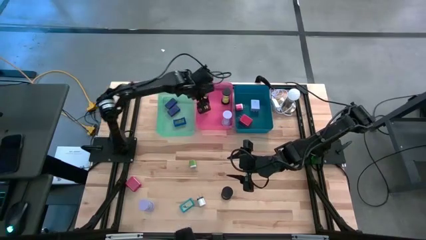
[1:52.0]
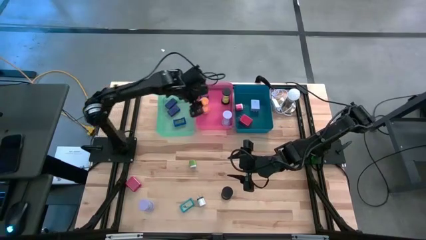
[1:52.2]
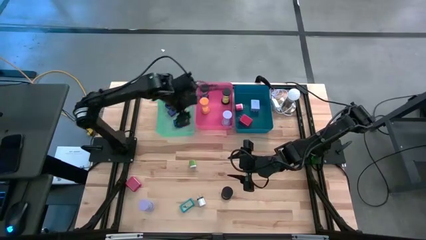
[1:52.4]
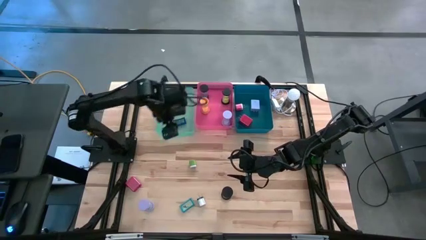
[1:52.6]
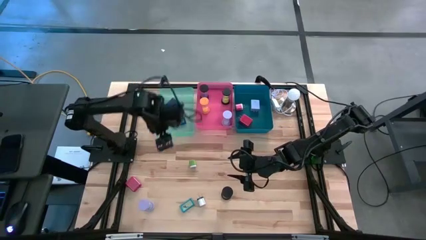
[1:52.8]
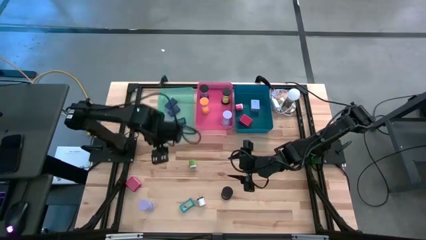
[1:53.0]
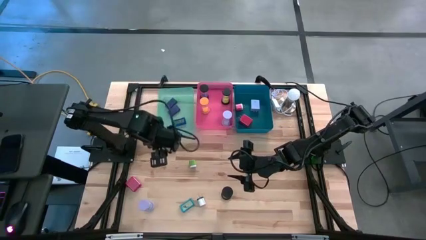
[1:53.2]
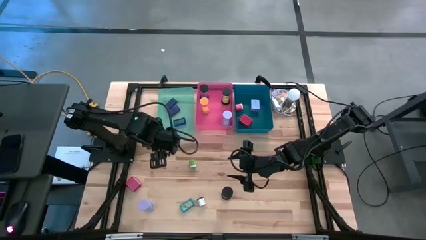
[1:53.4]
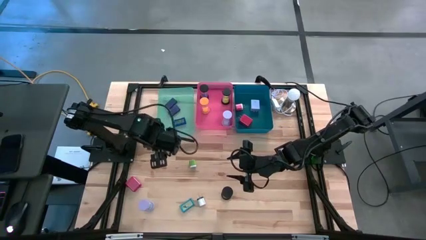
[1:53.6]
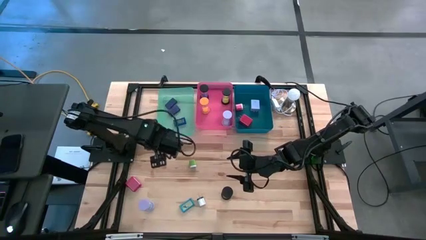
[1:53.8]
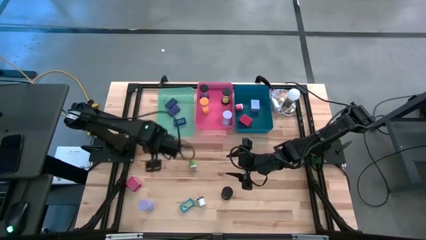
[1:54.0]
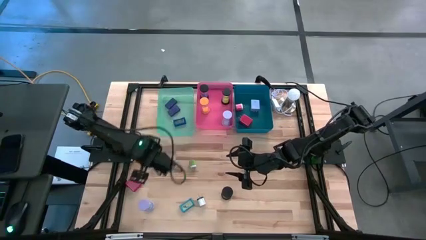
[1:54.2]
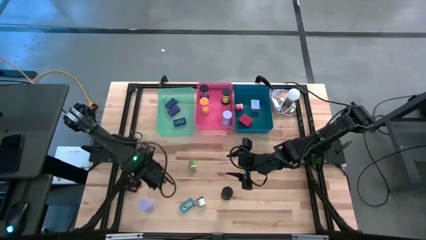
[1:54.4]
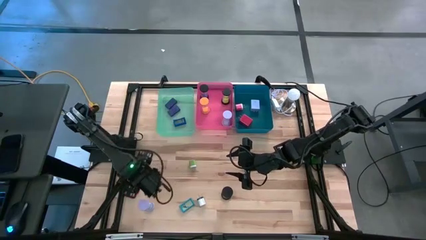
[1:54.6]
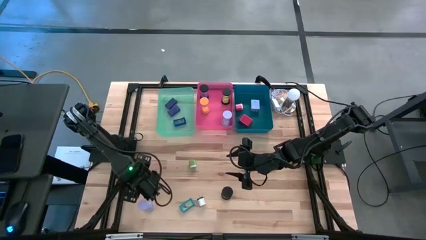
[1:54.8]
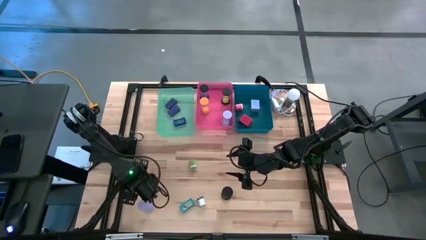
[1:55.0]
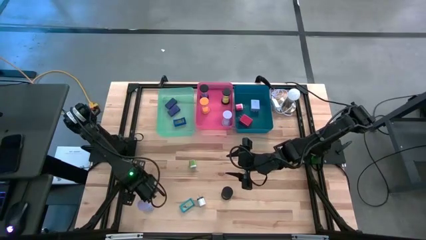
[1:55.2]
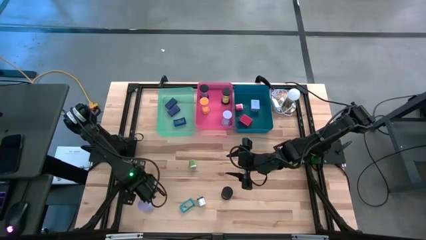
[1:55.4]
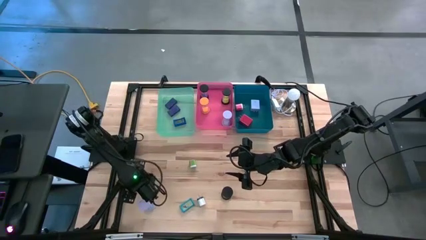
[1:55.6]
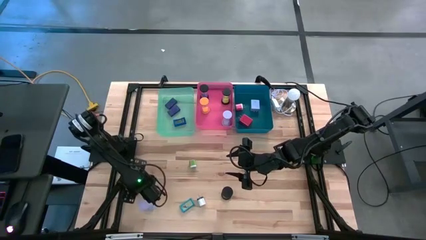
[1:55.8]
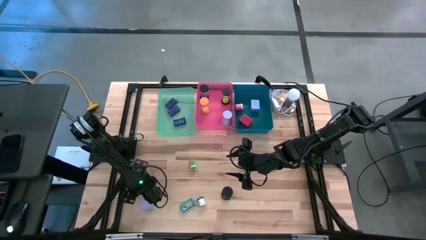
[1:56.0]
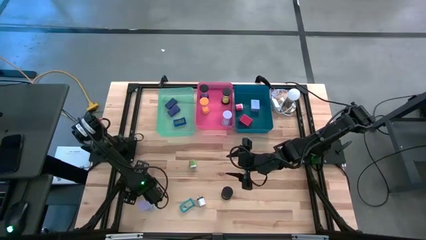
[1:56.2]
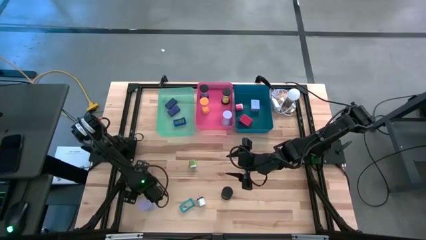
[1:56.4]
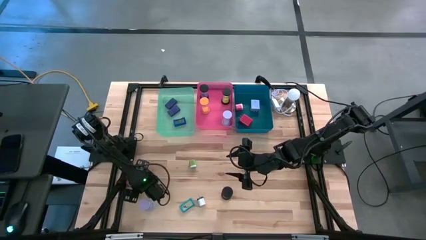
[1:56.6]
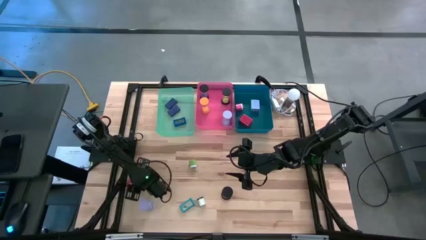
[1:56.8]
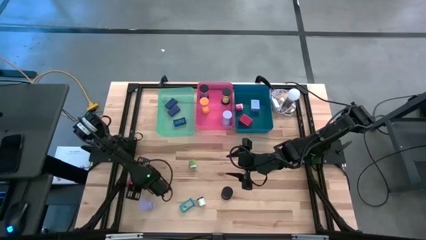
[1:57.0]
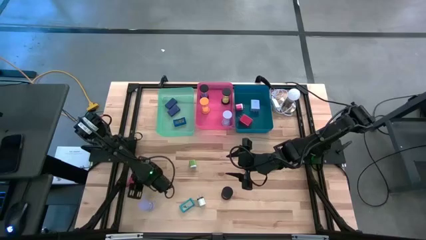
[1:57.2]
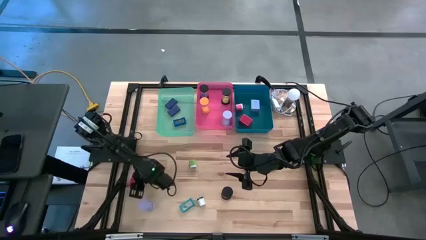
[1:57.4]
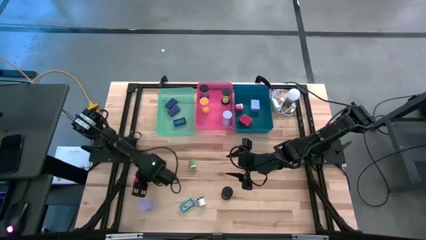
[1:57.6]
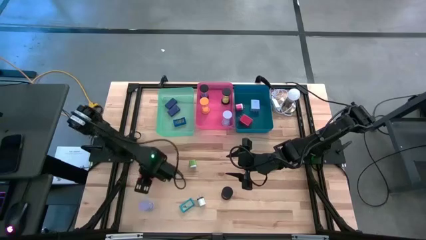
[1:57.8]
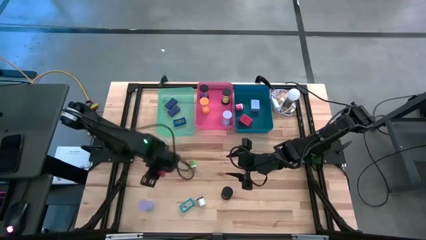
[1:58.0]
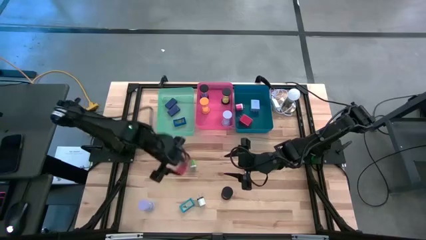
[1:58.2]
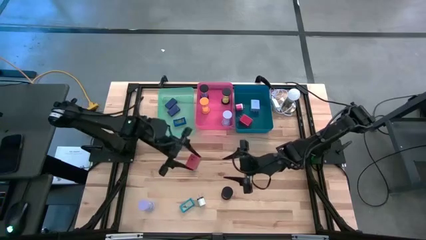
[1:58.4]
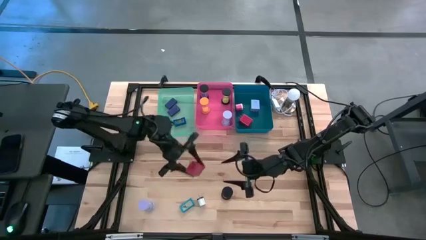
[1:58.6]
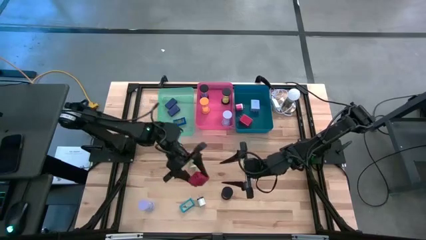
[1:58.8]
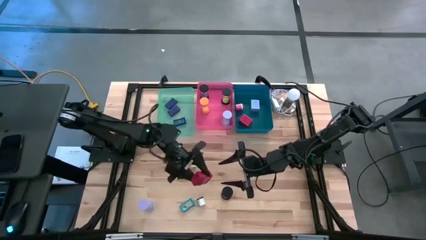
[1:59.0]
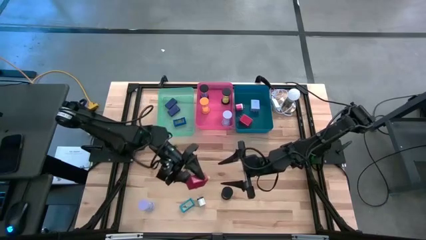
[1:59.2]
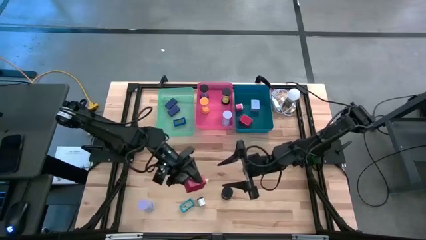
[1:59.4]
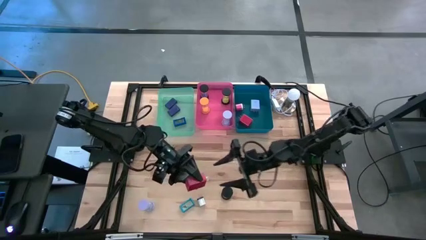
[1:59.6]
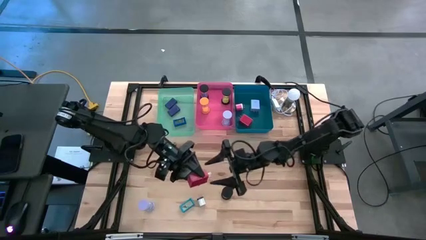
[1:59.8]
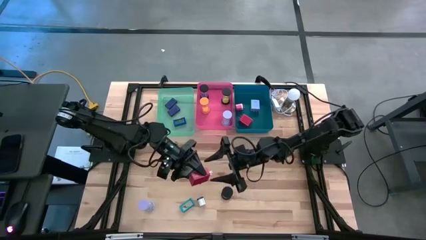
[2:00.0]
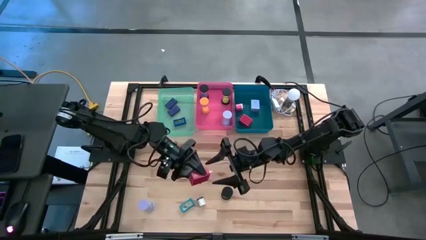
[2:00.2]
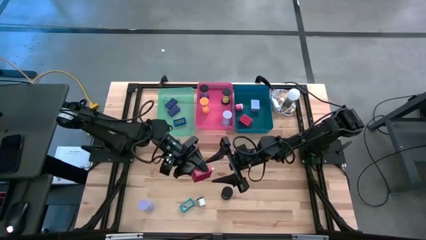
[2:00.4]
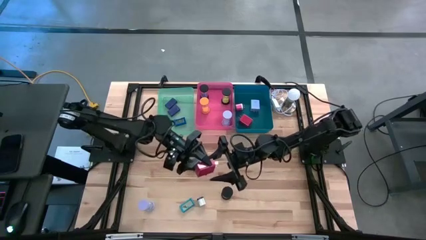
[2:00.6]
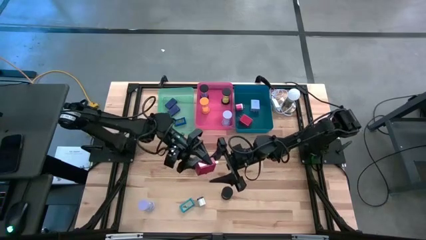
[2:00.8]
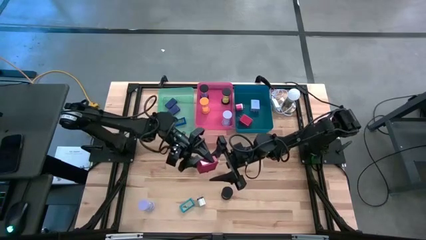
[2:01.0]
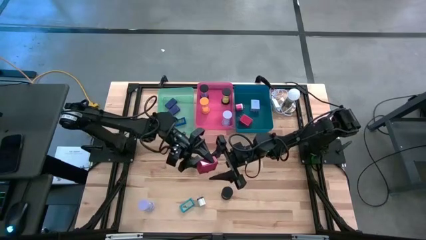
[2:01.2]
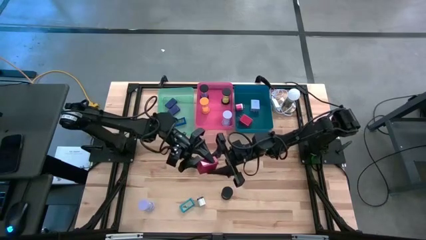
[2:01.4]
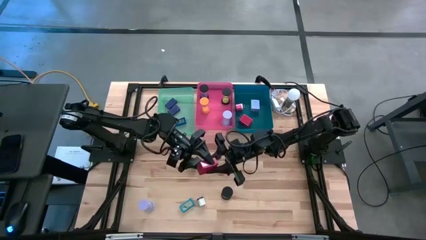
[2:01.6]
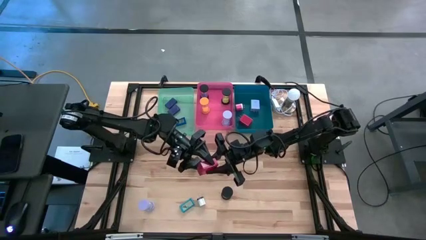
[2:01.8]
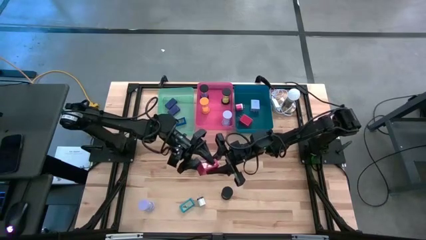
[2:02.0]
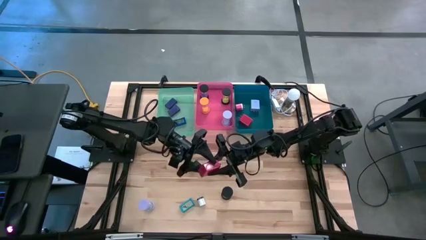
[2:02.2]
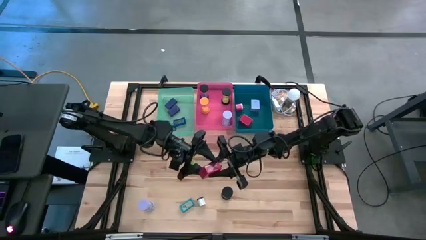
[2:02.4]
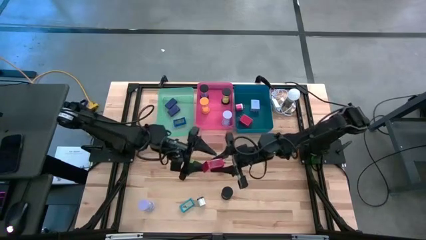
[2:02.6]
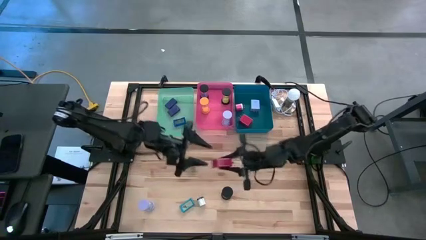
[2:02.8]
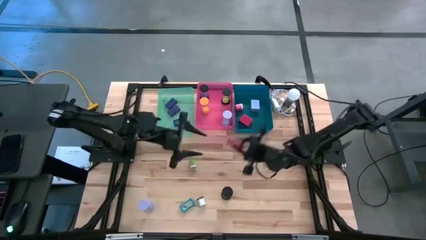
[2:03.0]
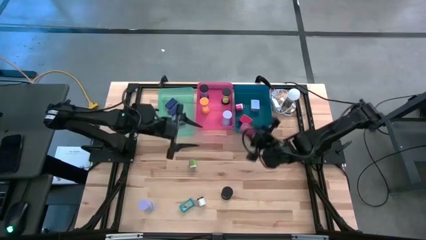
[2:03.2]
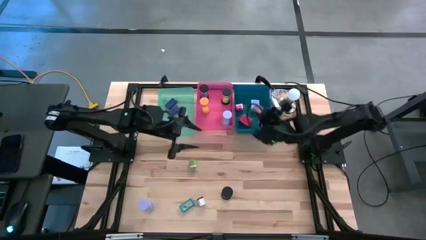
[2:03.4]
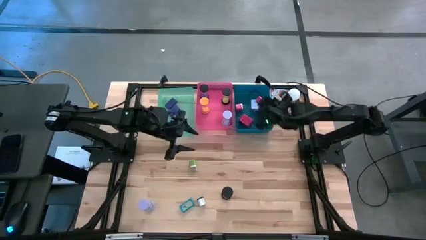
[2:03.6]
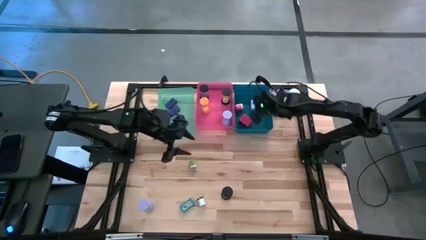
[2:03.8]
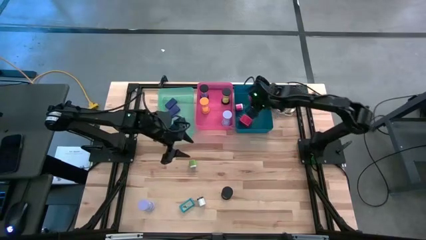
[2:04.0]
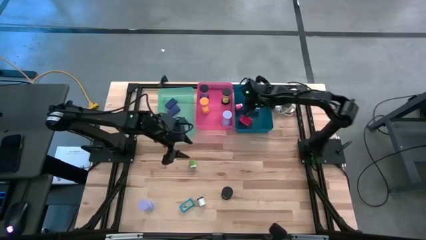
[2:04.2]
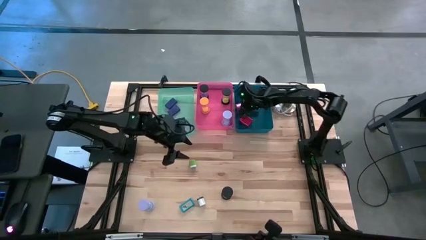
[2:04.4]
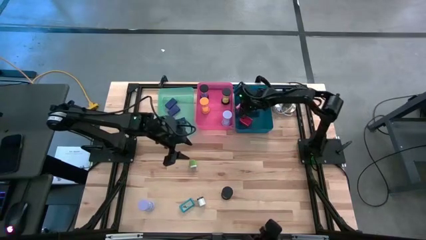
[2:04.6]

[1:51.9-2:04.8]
Task: Pick & Place Office items
Put the red charger adapter into the blue bin
